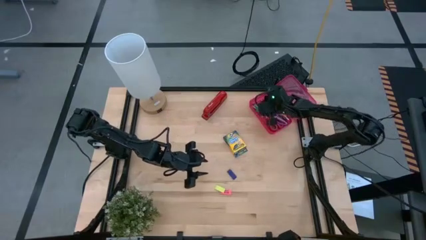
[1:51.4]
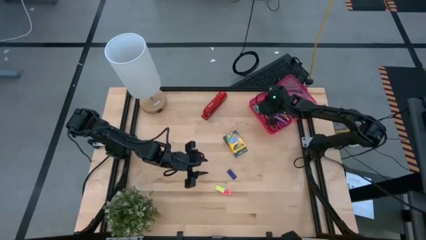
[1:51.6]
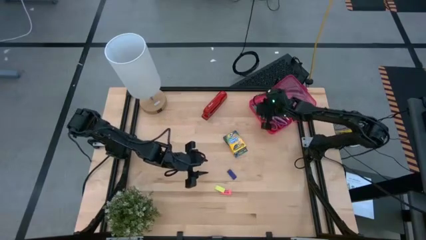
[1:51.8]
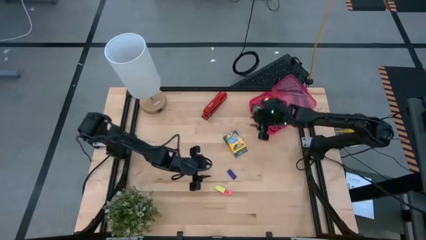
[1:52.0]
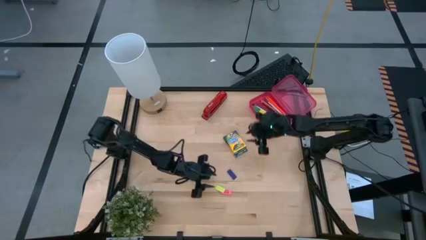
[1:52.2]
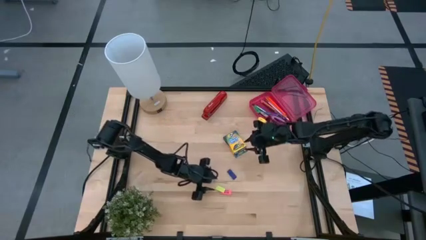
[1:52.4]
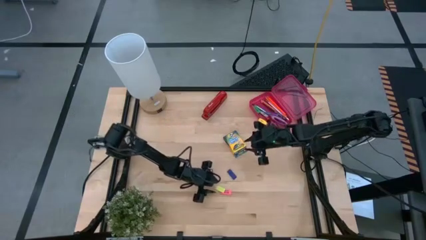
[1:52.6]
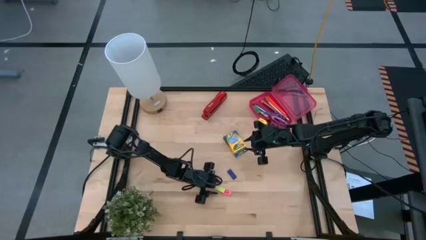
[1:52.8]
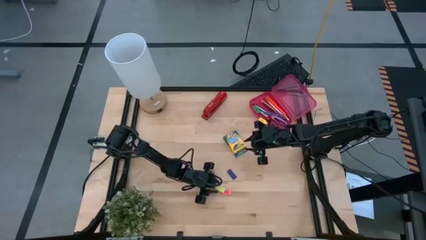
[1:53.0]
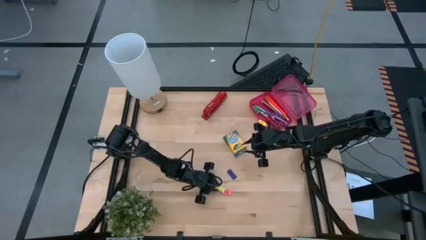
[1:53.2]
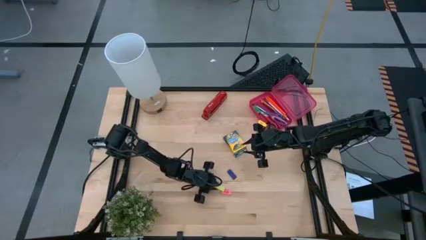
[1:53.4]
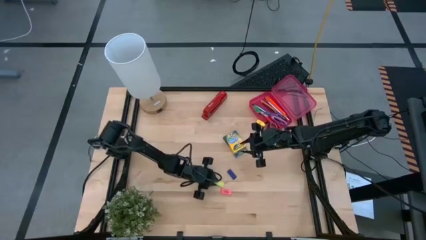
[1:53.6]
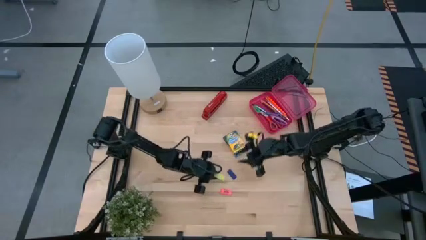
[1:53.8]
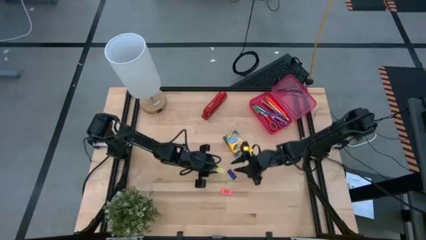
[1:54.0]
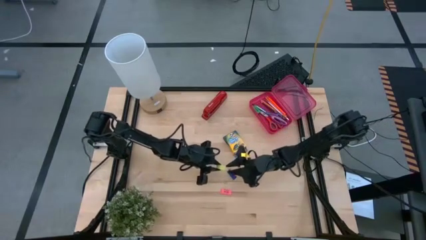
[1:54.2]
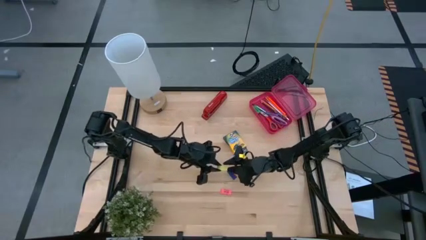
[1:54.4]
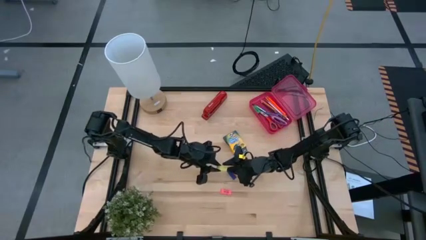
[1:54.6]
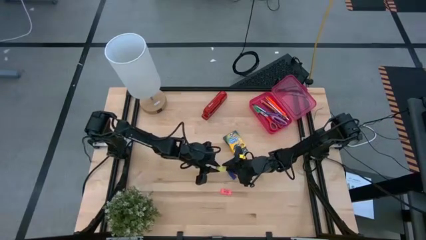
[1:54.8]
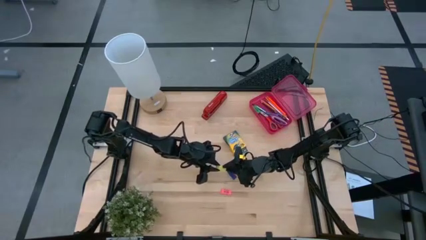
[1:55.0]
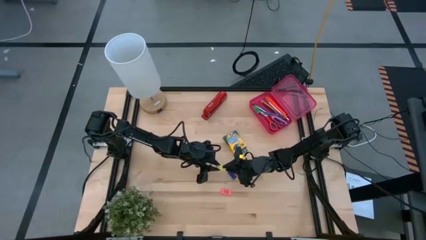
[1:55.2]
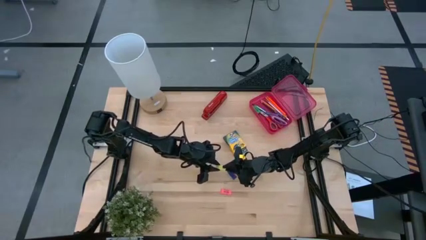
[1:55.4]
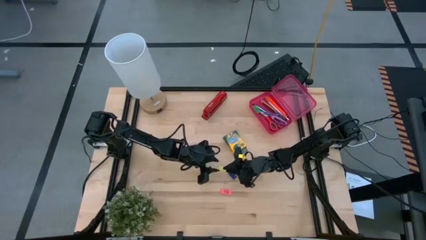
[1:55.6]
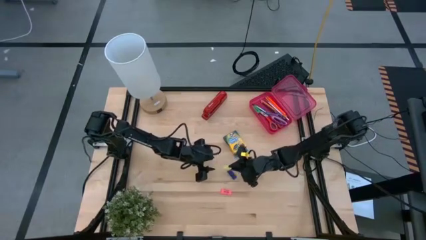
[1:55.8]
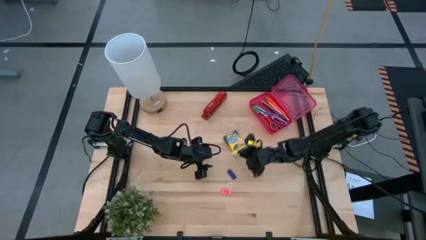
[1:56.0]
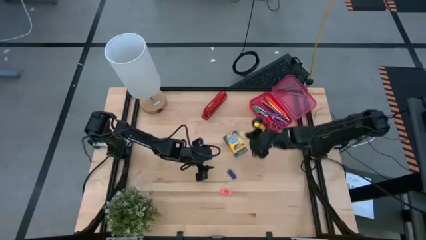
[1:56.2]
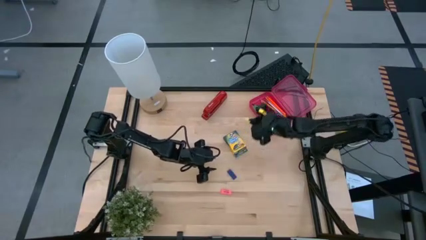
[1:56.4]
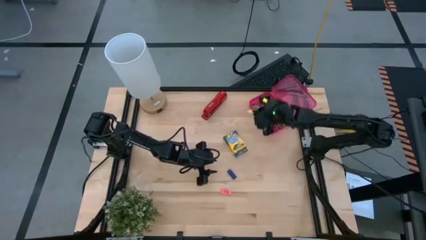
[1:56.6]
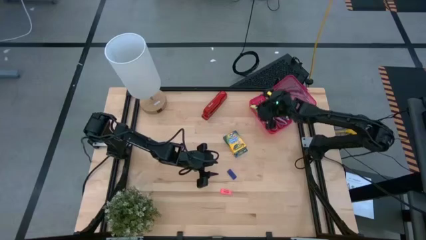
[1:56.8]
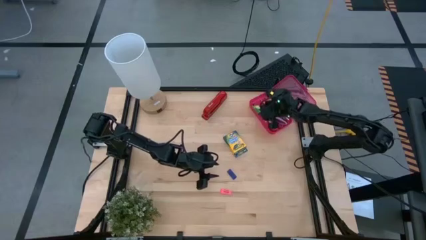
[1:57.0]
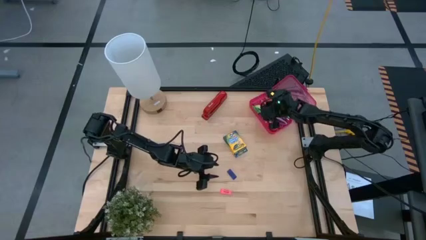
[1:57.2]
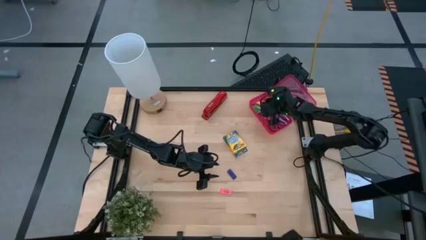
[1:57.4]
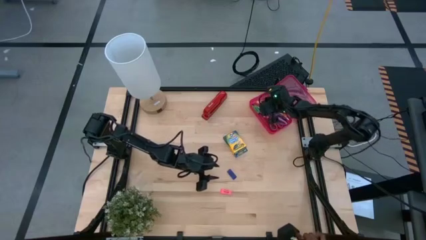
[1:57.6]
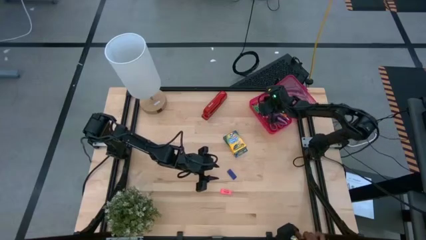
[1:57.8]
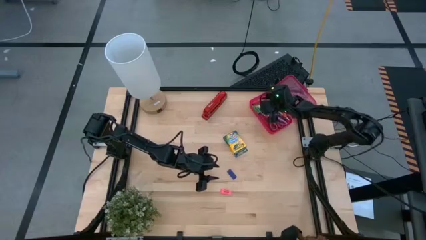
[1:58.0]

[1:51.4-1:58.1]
Task: Pack school essentials
Put the light green eraser into the pink supply box

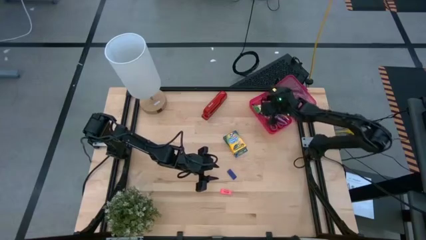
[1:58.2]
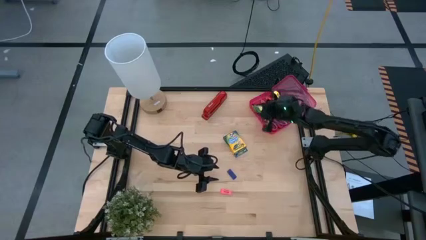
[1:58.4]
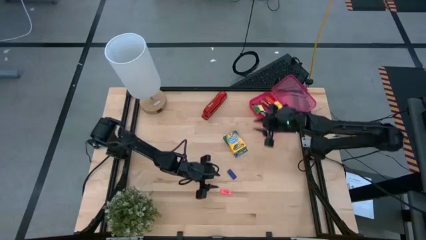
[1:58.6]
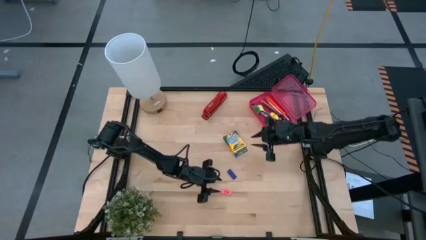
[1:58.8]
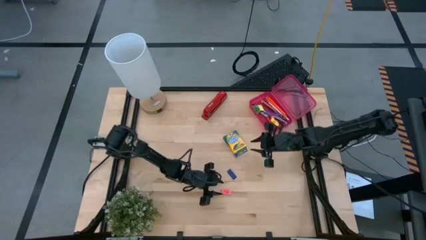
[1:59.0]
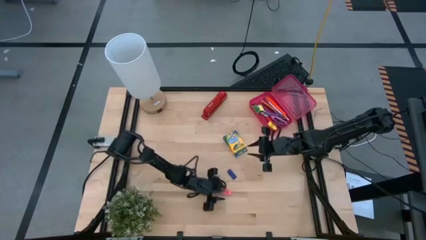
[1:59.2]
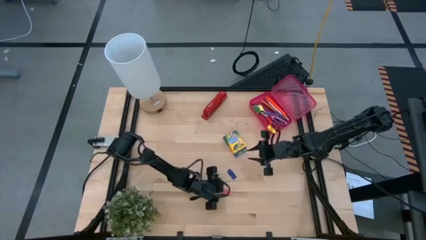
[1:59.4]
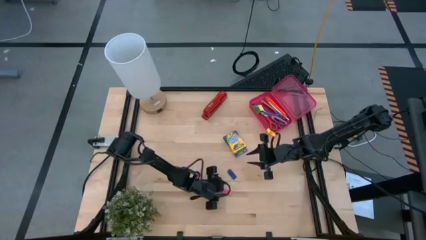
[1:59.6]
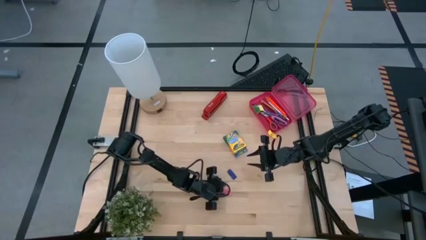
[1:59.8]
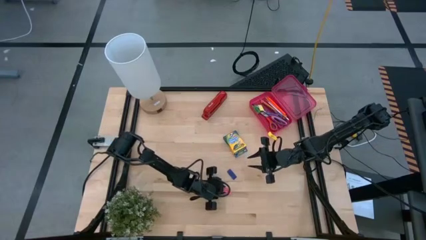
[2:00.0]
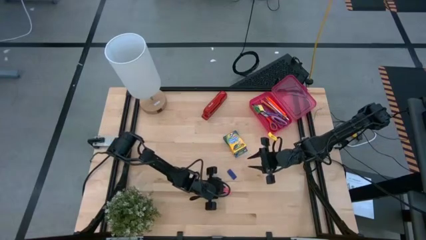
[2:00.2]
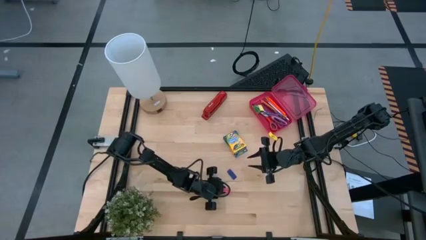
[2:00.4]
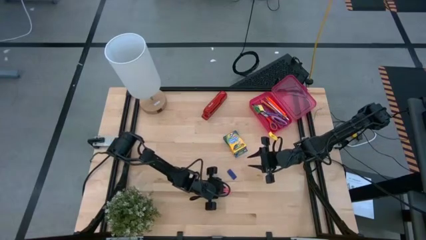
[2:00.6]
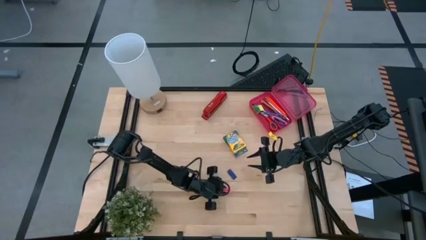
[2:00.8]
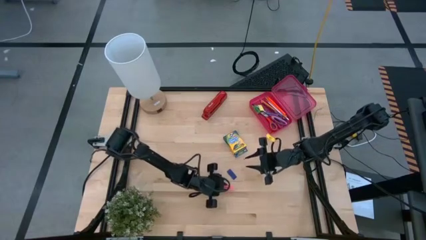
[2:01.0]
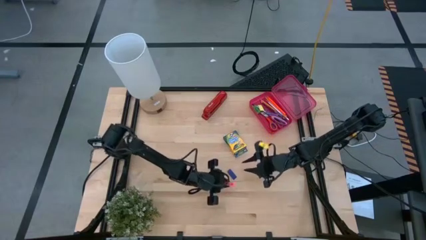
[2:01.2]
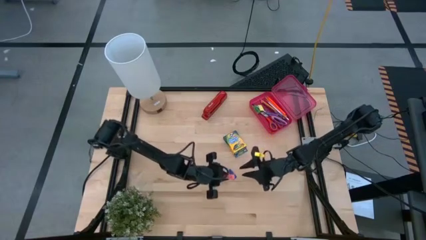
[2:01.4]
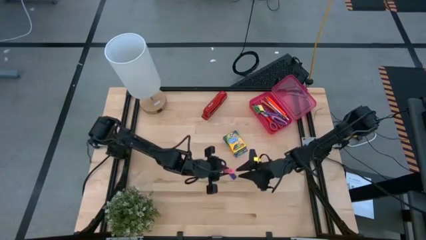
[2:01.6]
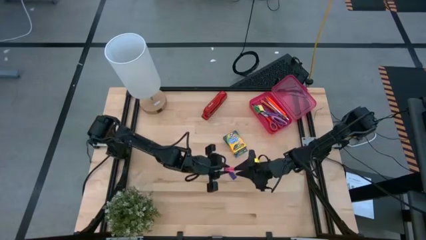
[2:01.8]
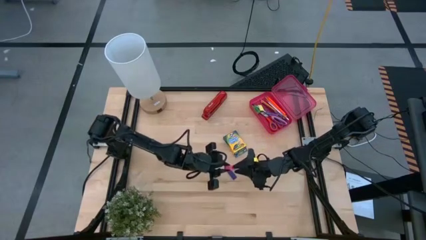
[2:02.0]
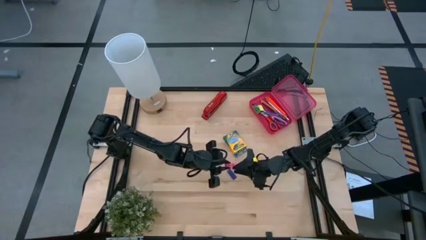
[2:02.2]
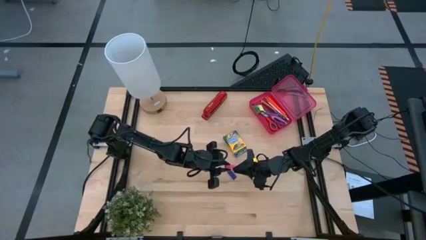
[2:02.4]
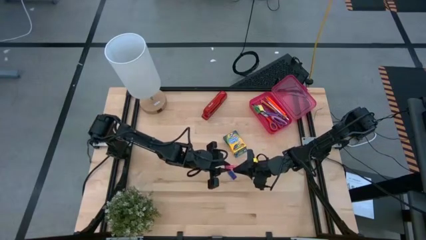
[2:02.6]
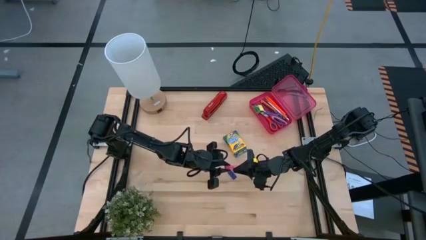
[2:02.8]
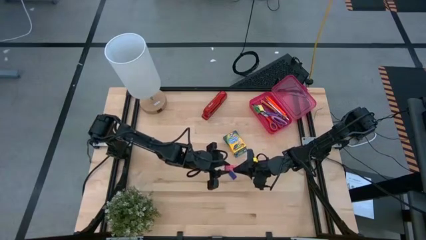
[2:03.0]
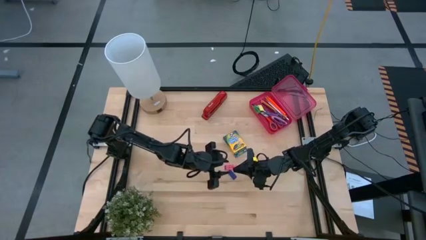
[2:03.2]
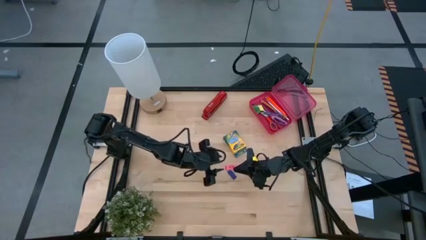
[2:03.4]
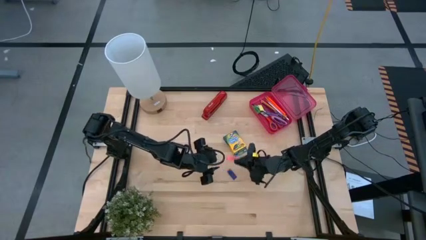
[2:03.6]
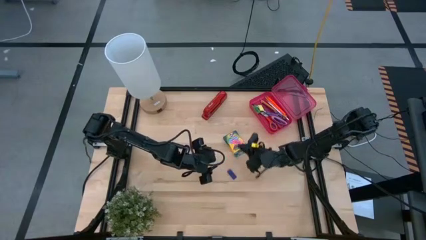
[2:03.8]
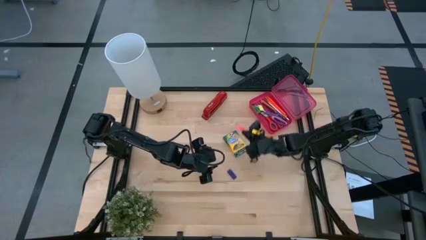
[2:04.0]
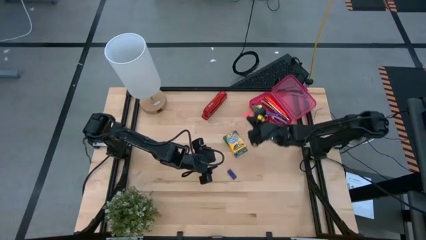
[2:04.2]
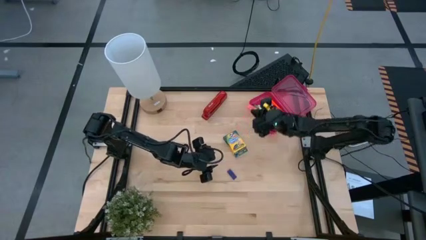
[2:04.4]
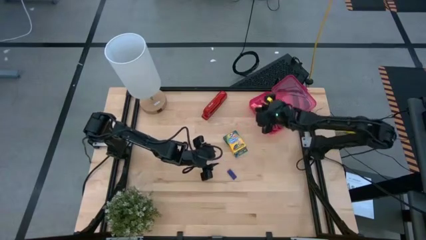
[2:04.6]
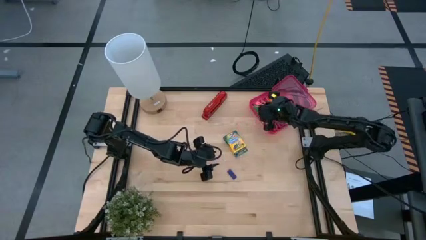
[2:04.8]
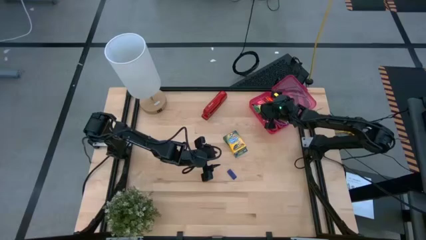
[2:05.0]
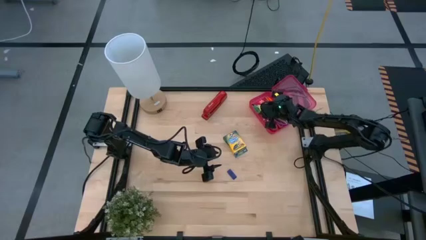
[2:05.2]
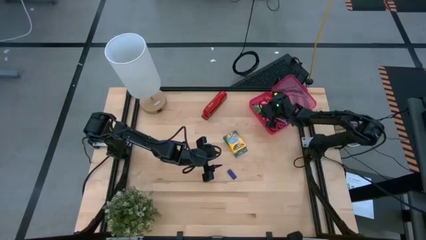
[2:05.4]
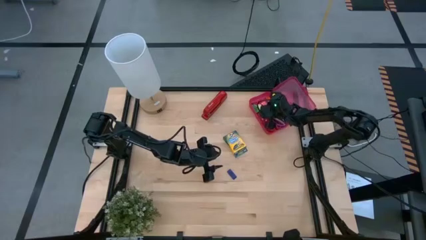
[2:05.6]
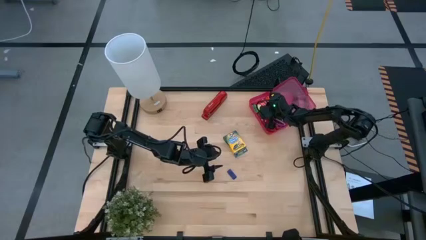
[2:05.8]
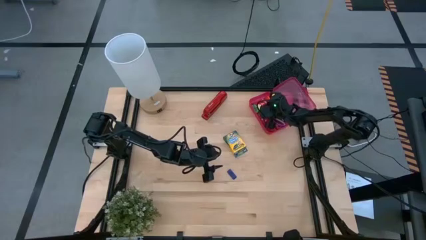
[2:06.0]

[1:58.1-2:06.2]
Put the pink eraser into the pink supply box
